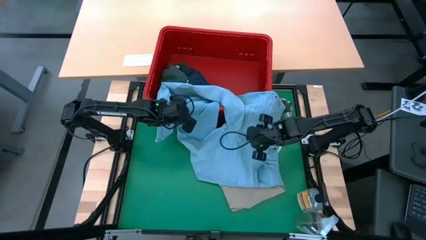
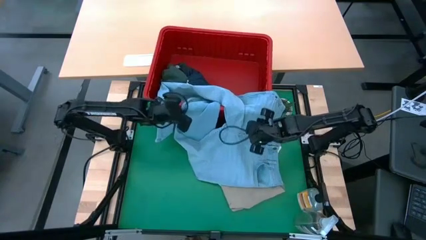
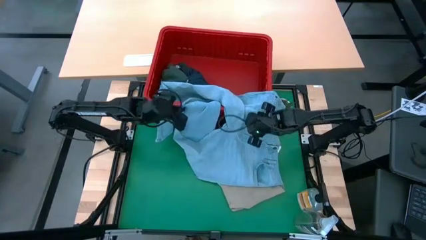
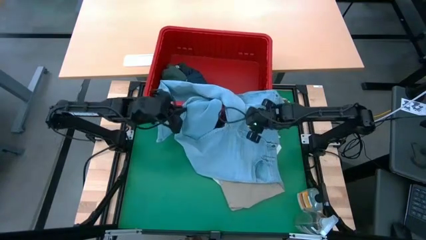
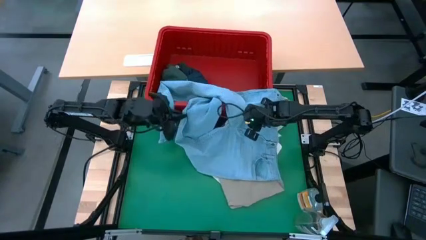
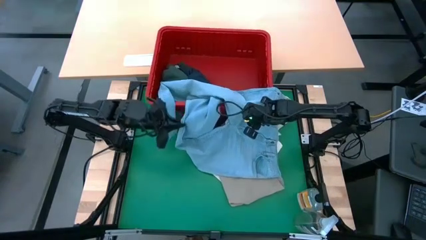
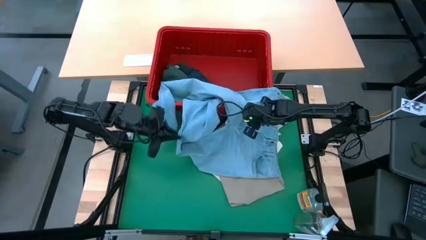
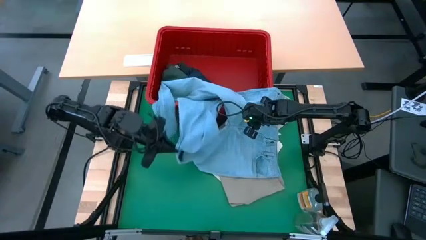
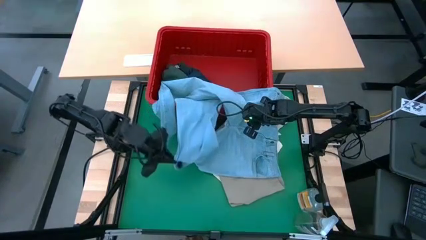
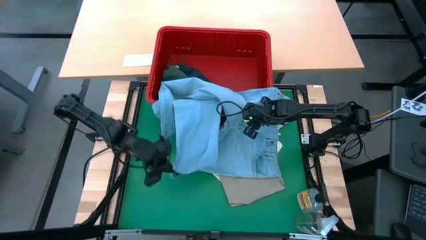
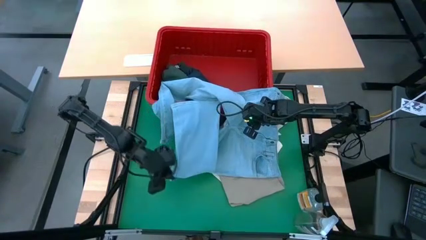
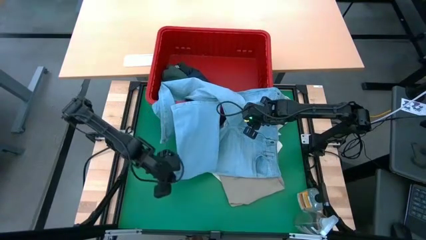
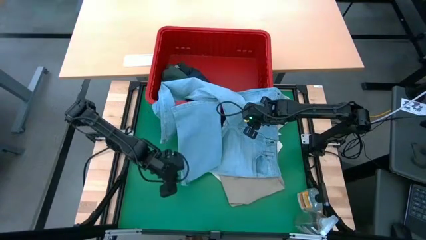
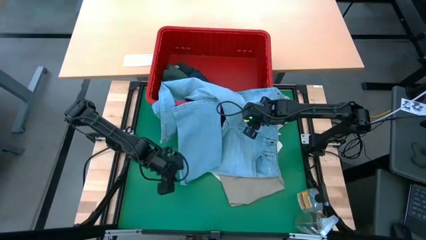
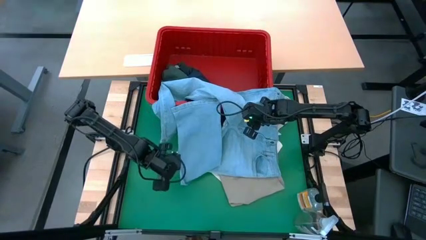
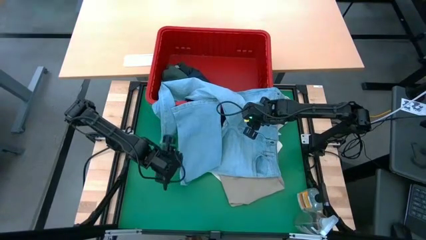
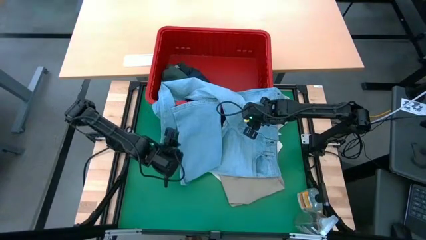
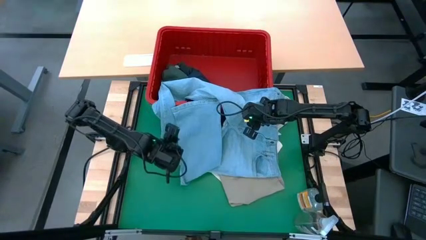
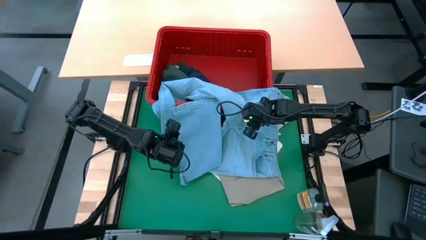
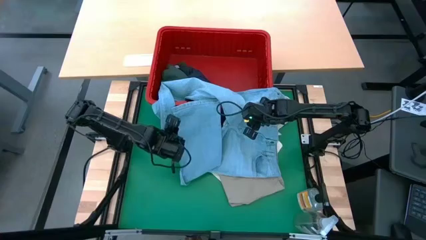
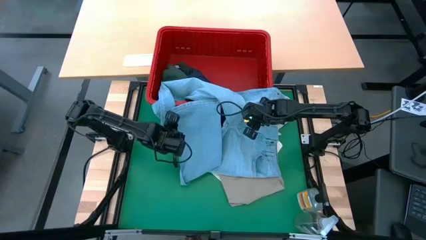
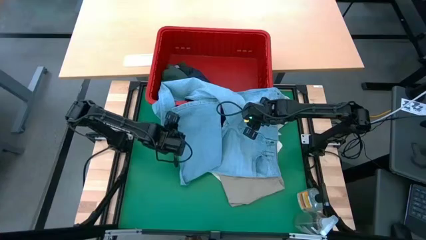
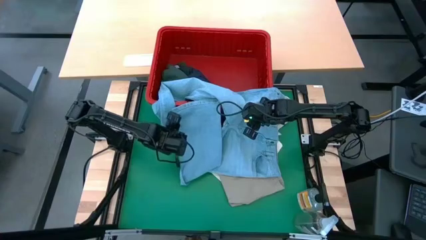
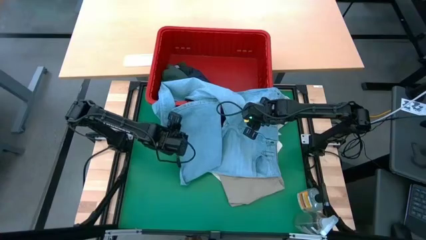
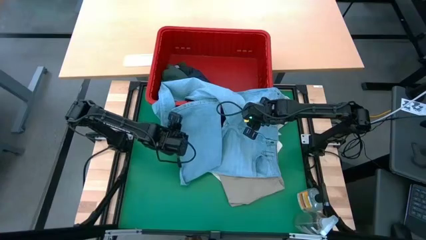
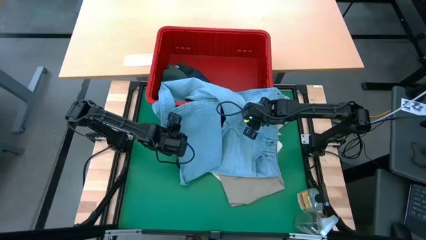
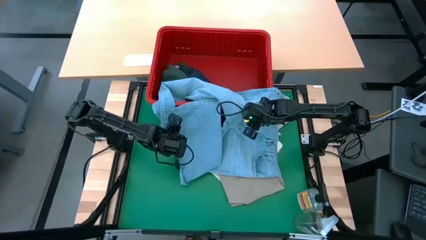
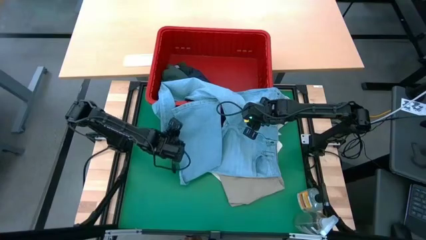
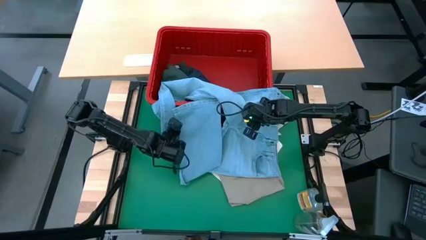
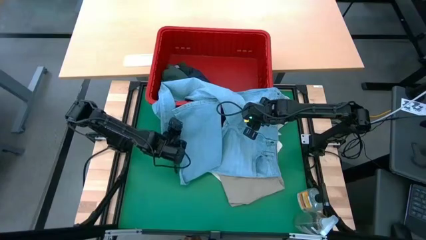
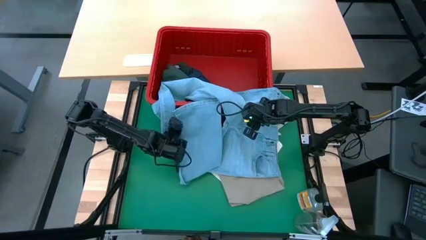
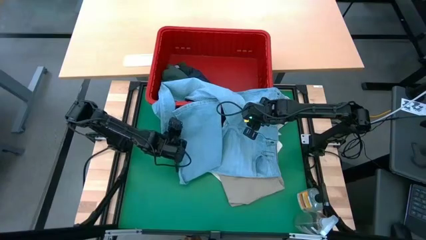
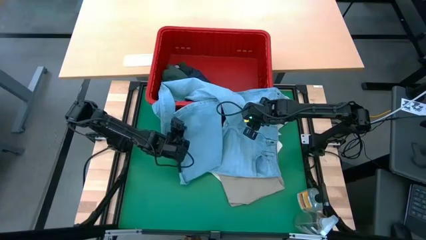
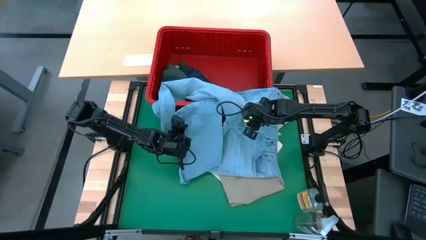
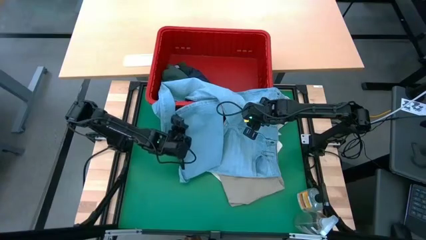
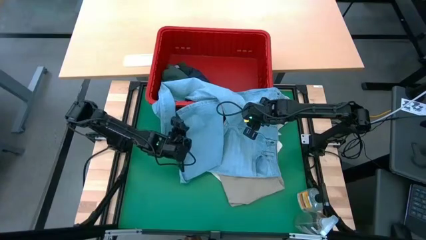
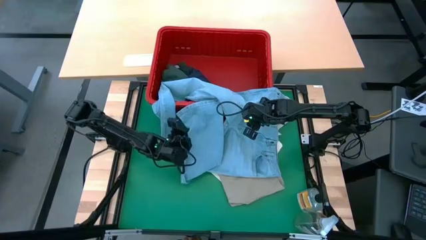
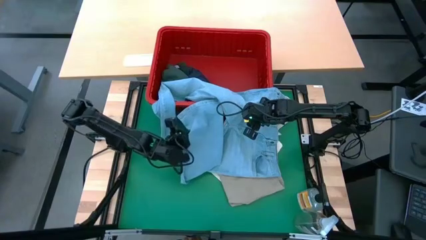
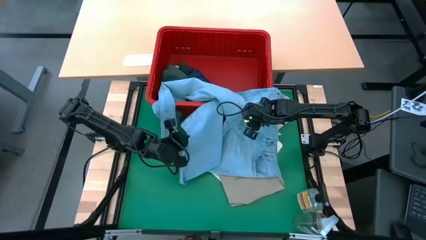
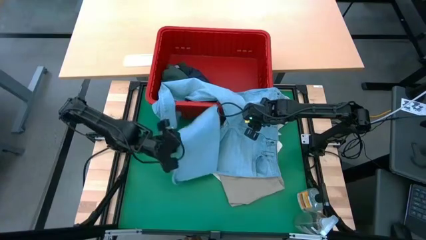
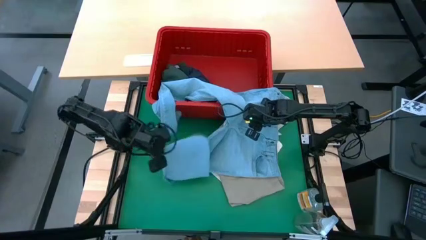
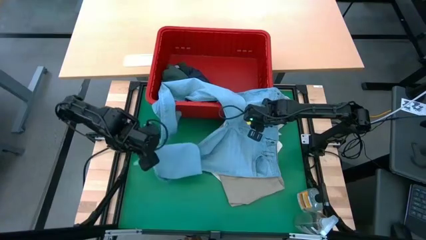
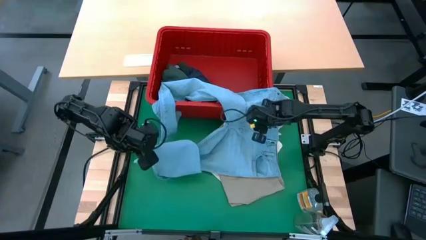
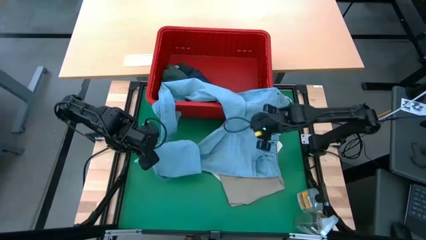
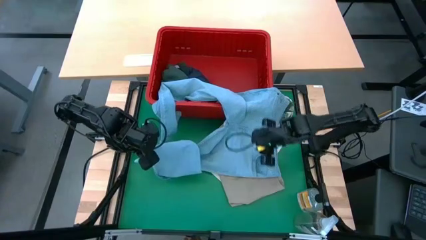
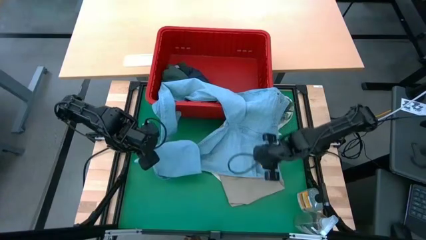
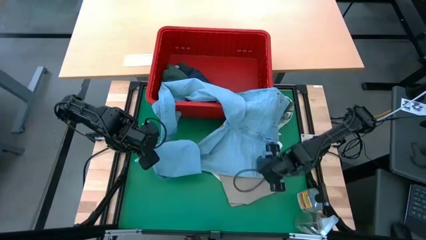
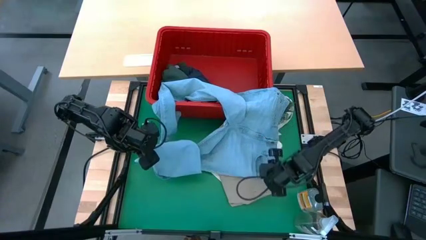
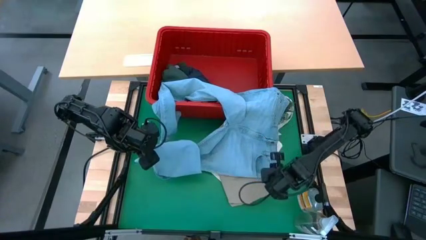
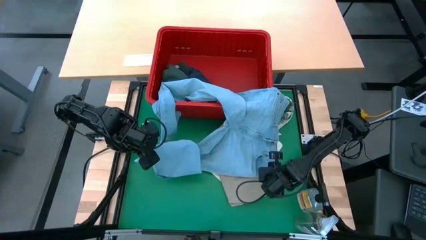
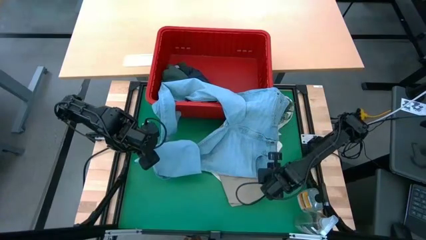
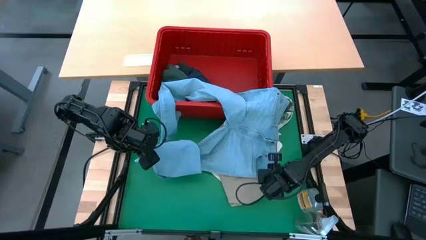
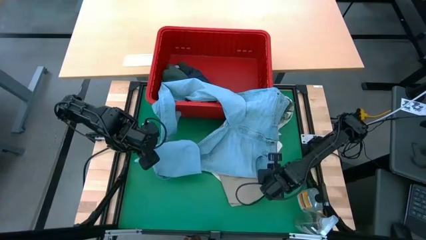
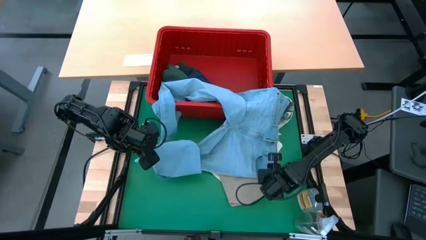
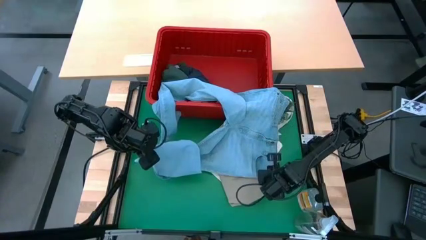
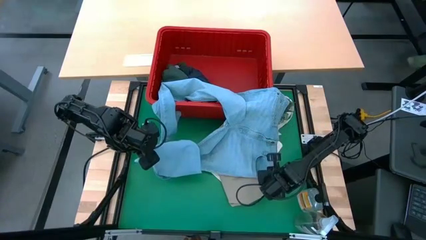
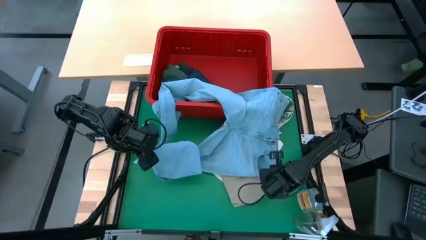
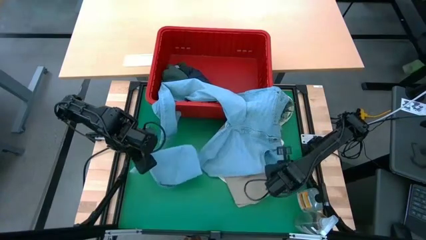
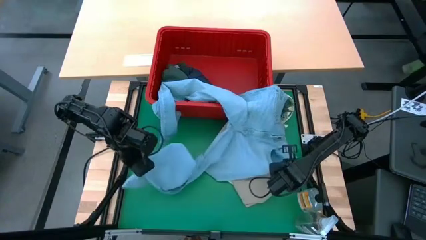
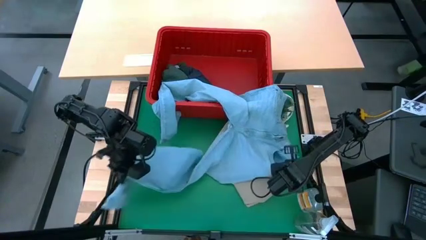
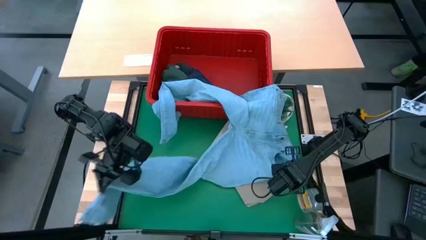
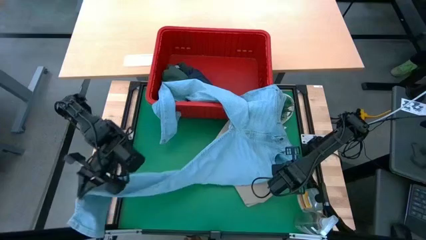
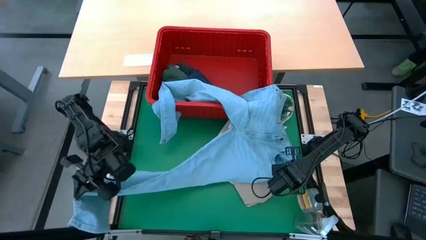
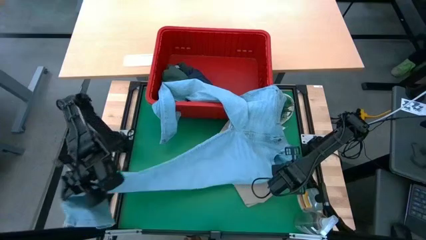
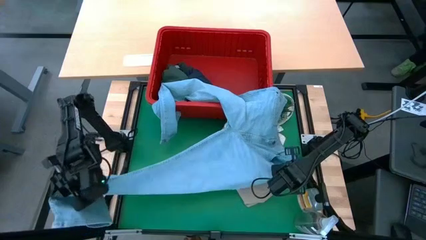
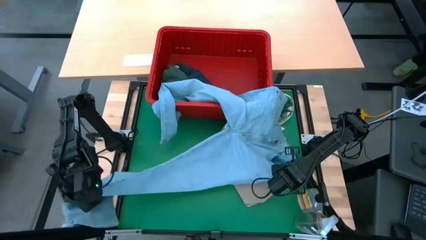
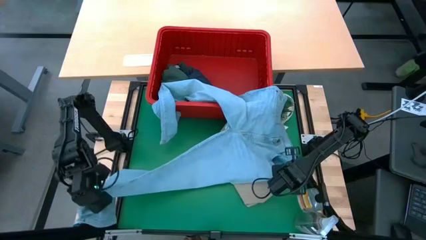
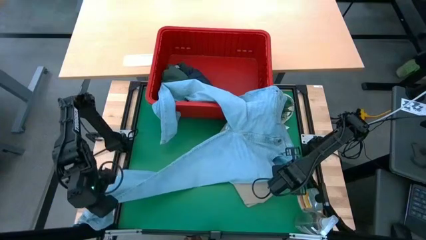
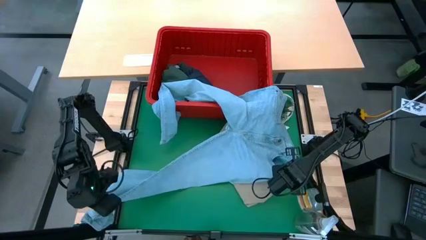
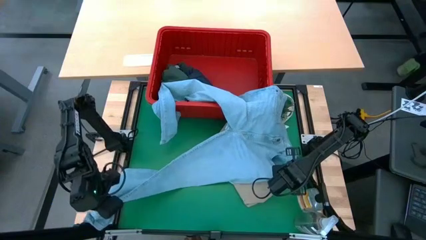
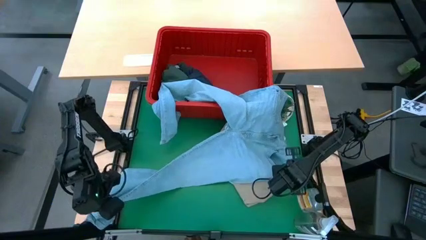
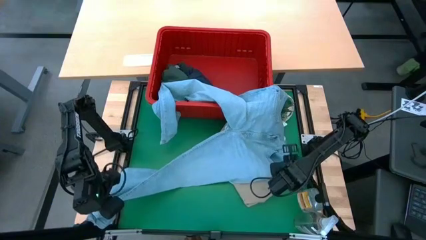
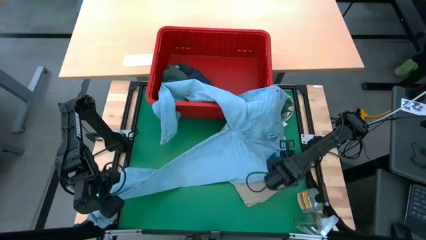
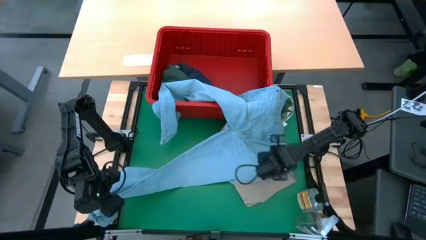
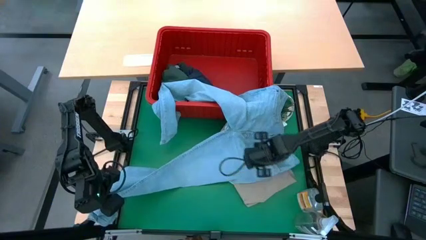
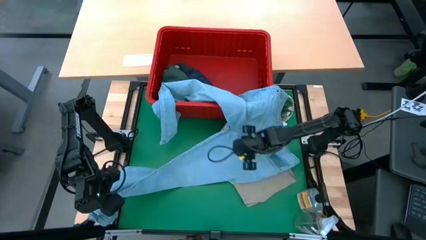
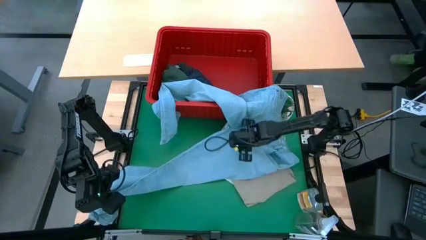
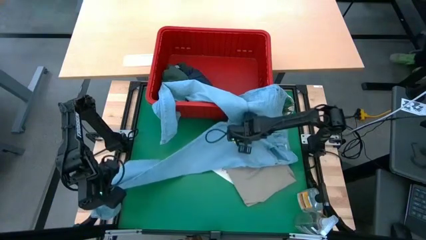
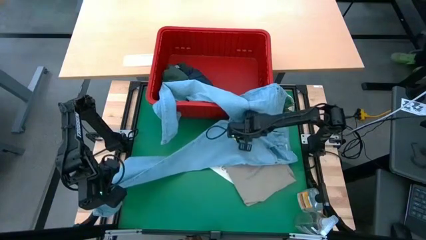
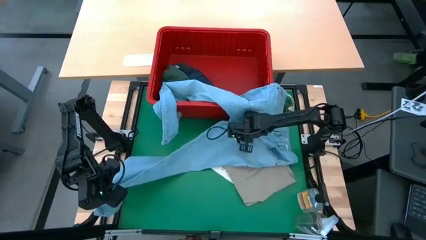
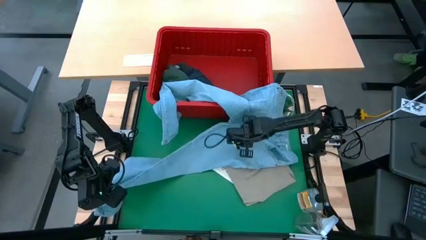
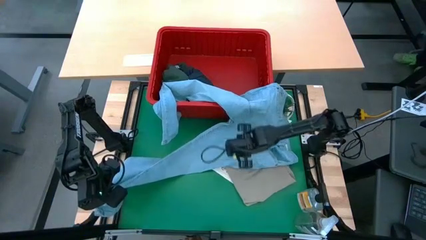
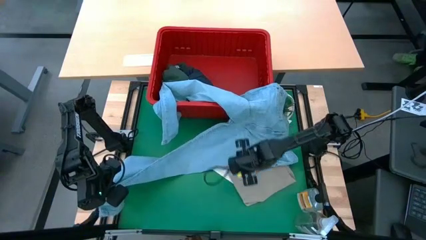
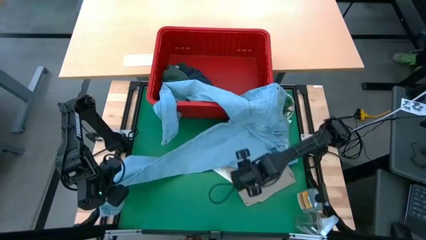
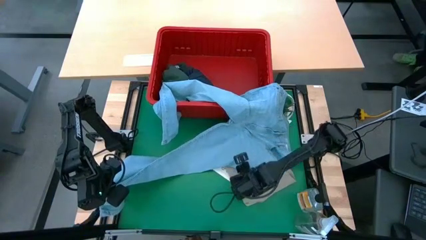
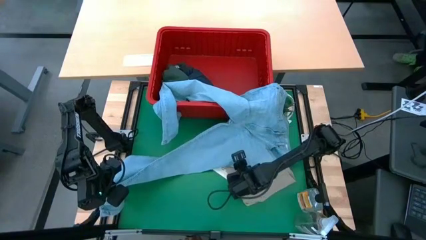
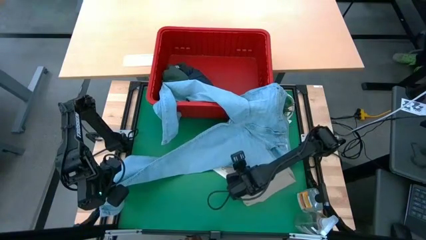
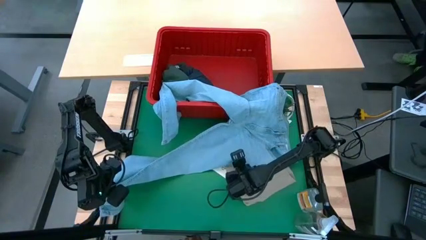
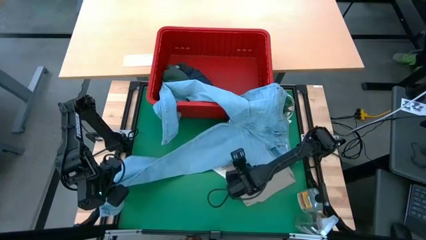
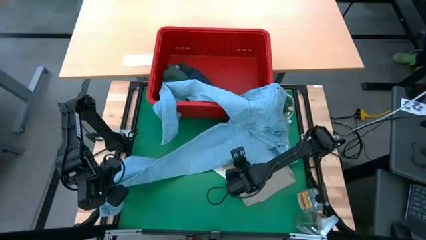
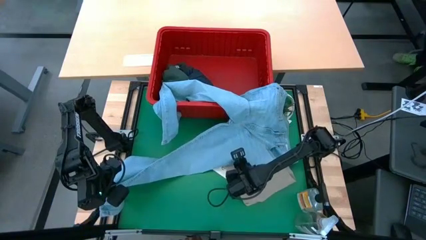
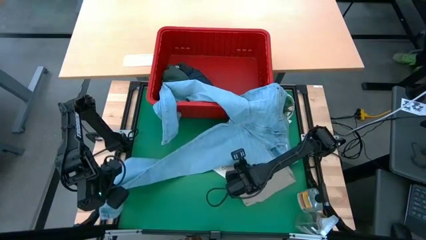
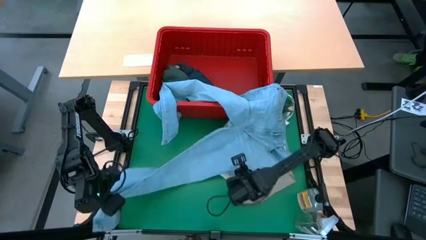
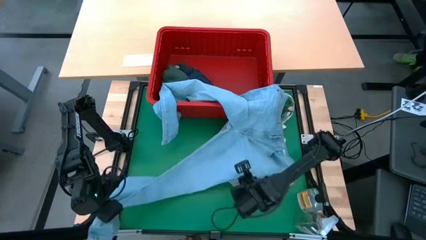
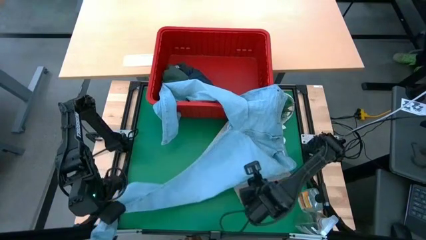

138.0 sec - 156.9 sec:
Task: Fold Laundry from Bin
Fold the light blue jeans
